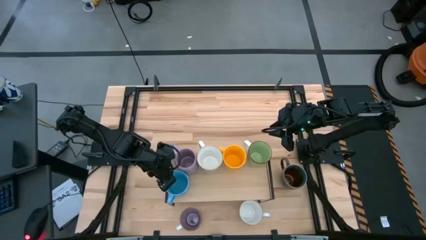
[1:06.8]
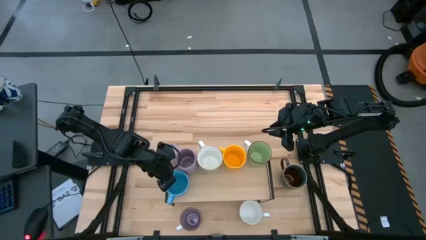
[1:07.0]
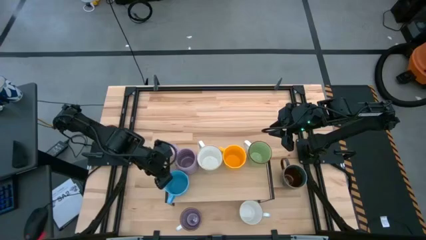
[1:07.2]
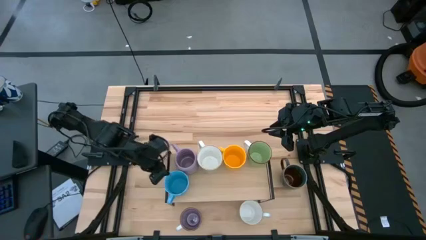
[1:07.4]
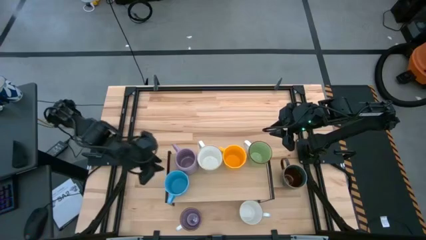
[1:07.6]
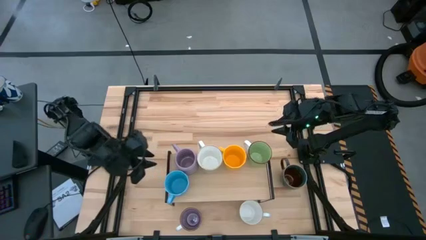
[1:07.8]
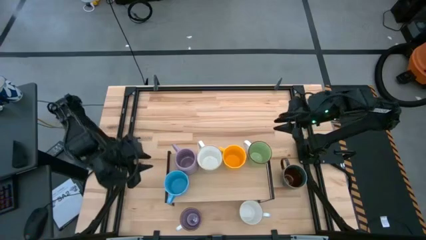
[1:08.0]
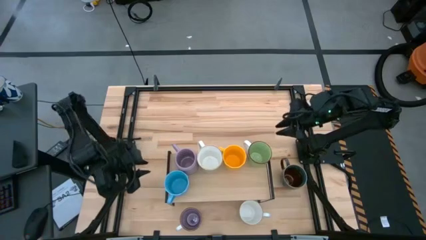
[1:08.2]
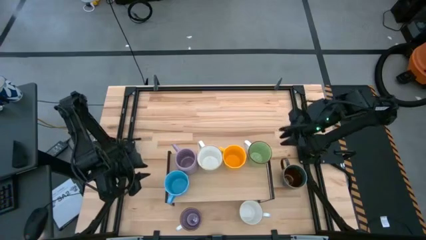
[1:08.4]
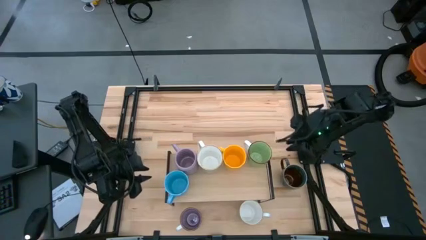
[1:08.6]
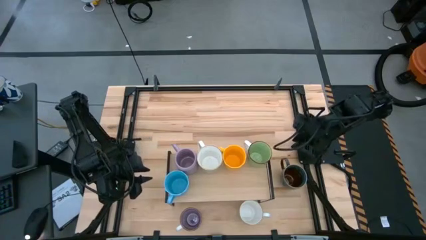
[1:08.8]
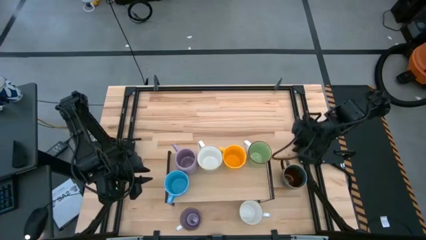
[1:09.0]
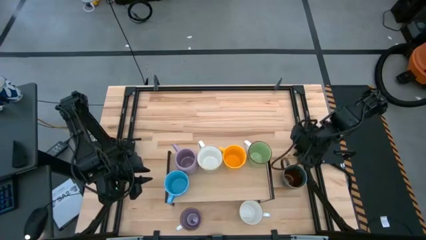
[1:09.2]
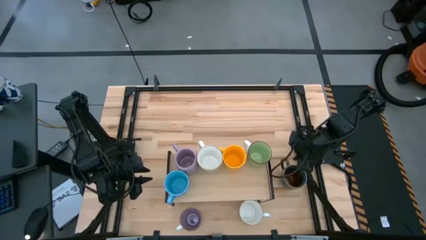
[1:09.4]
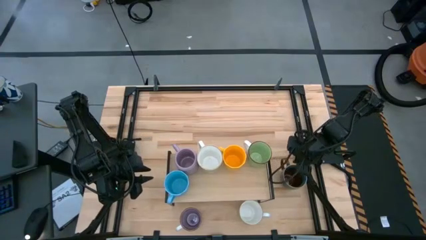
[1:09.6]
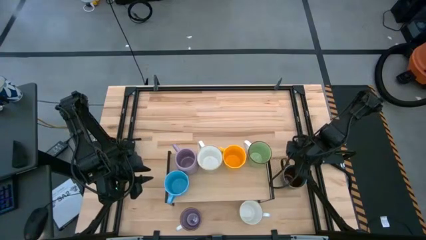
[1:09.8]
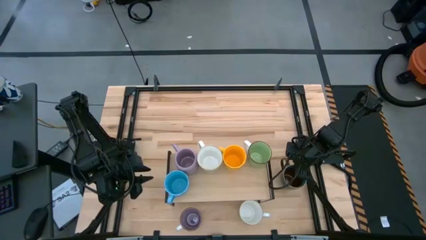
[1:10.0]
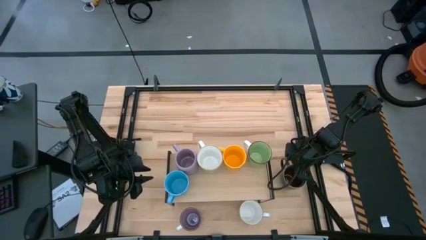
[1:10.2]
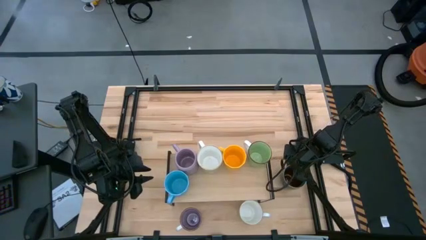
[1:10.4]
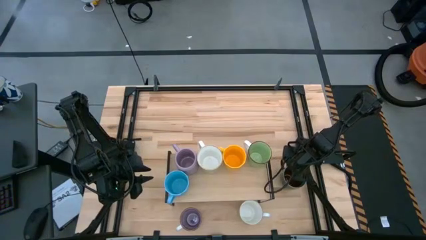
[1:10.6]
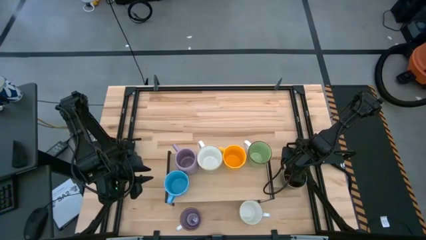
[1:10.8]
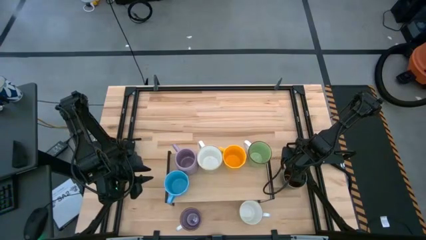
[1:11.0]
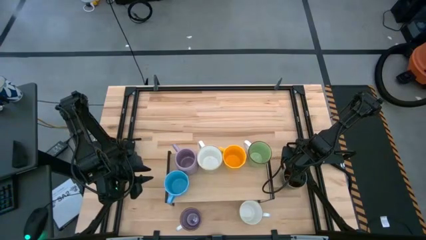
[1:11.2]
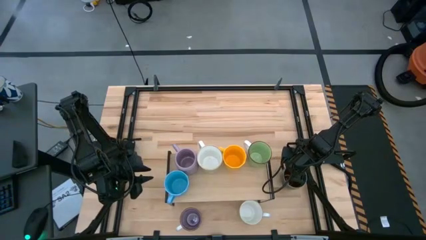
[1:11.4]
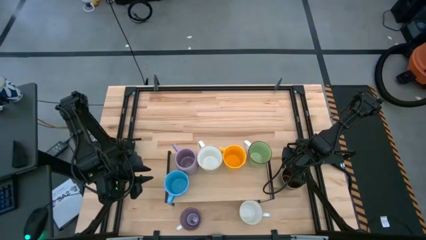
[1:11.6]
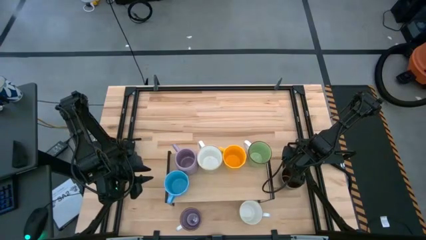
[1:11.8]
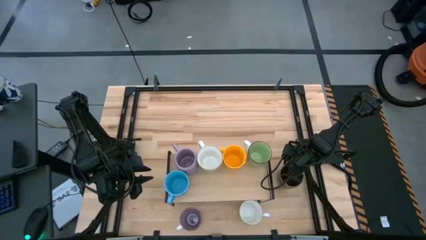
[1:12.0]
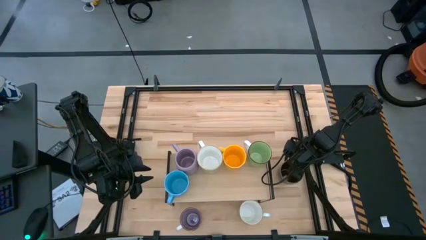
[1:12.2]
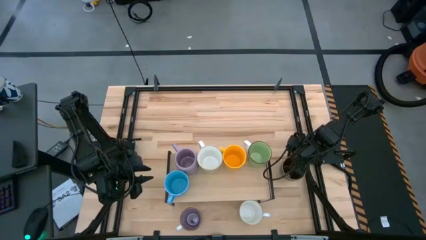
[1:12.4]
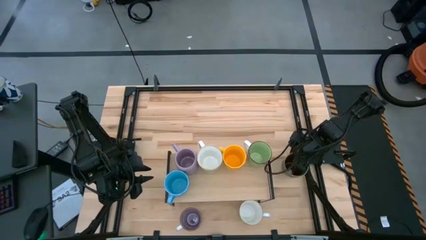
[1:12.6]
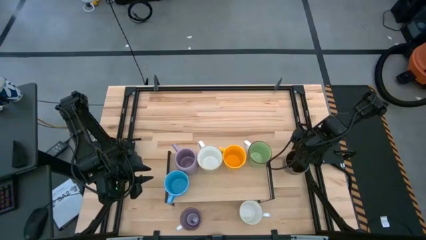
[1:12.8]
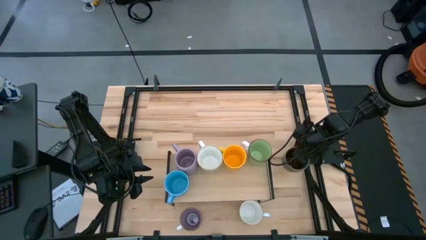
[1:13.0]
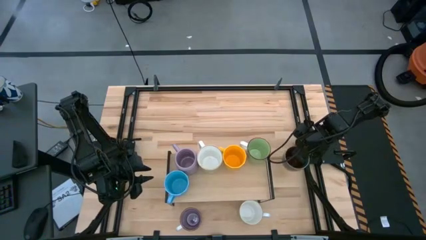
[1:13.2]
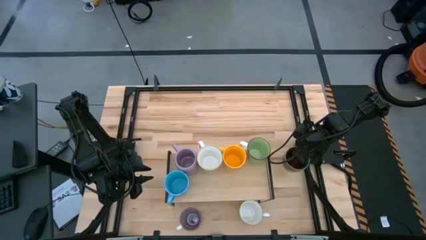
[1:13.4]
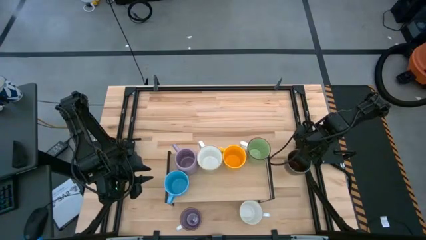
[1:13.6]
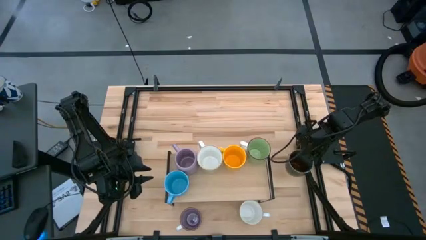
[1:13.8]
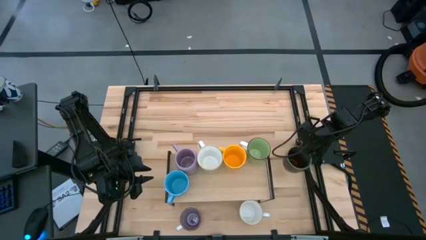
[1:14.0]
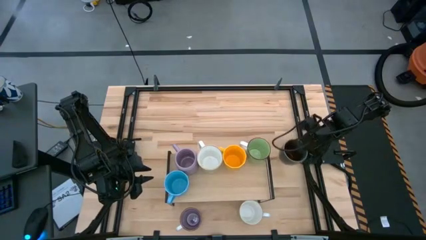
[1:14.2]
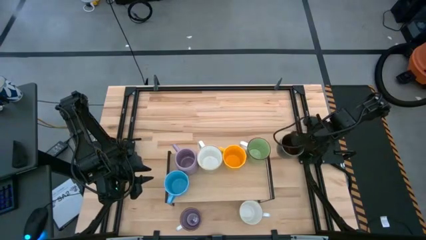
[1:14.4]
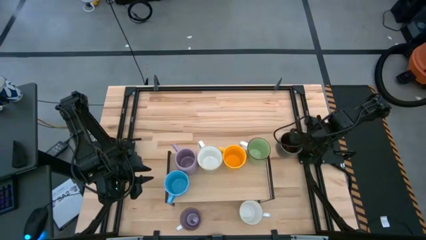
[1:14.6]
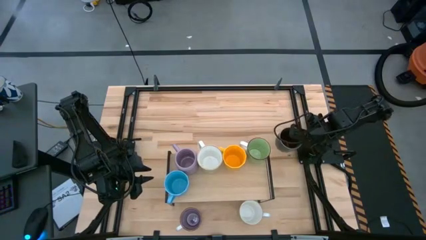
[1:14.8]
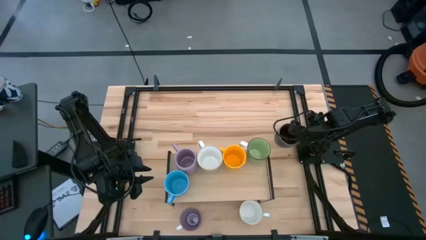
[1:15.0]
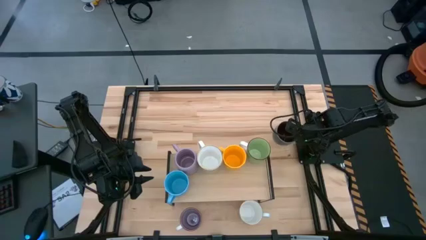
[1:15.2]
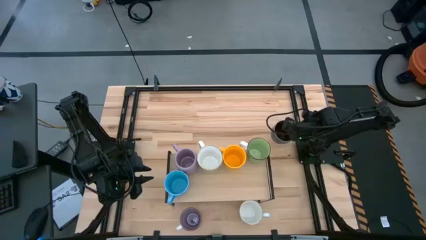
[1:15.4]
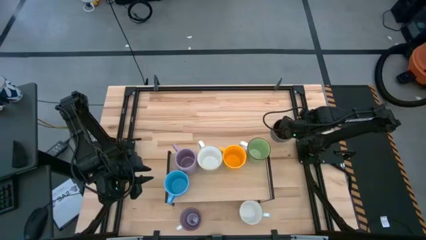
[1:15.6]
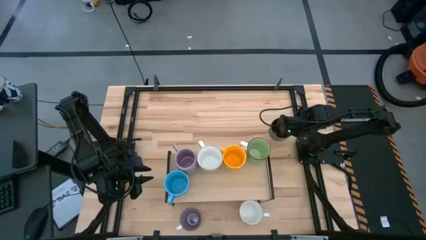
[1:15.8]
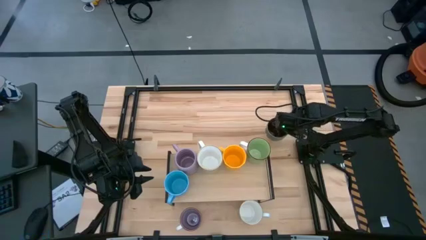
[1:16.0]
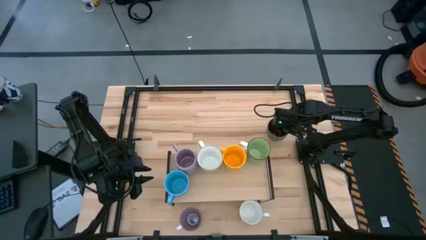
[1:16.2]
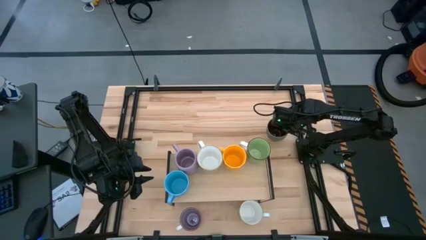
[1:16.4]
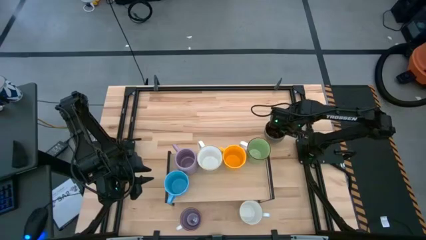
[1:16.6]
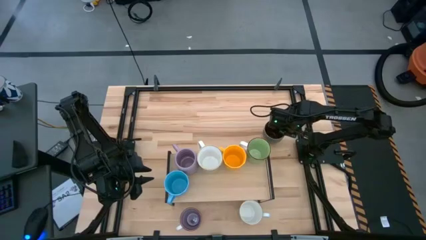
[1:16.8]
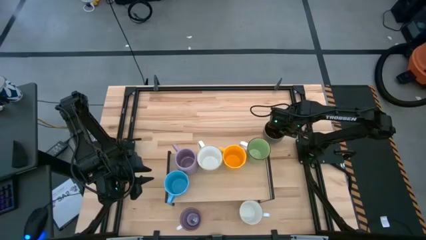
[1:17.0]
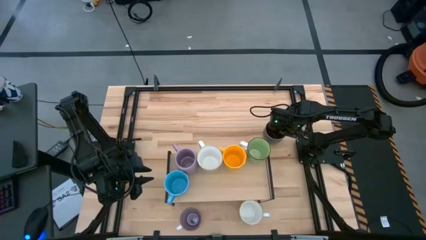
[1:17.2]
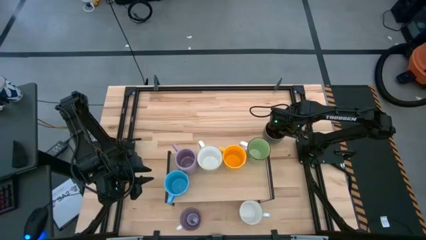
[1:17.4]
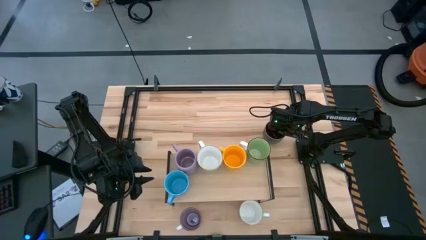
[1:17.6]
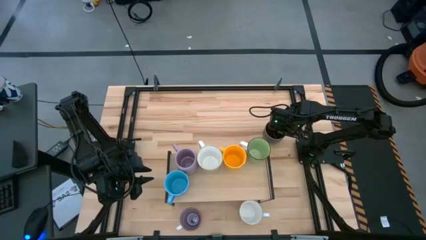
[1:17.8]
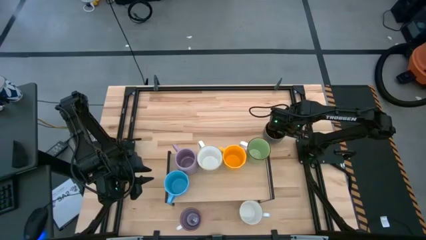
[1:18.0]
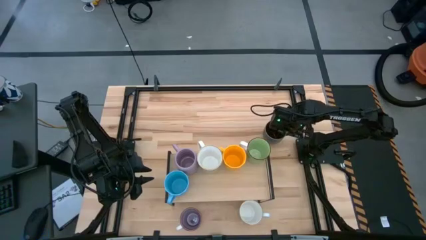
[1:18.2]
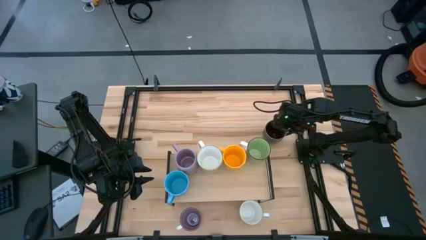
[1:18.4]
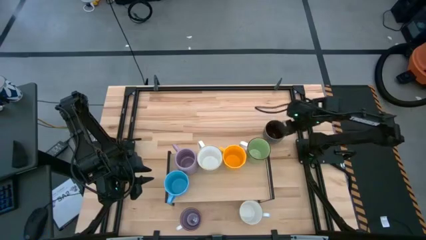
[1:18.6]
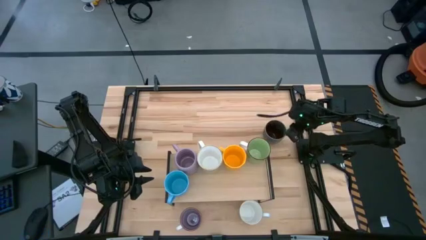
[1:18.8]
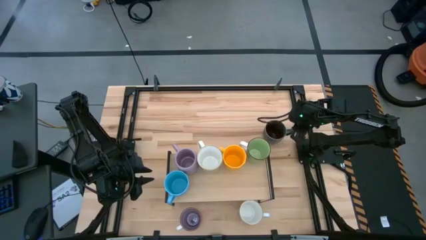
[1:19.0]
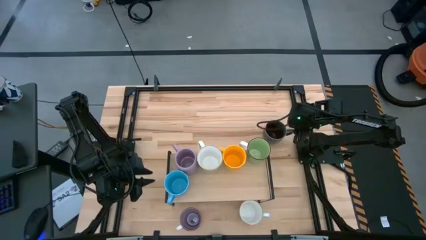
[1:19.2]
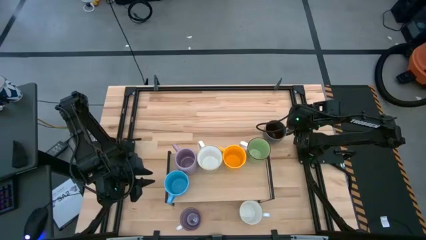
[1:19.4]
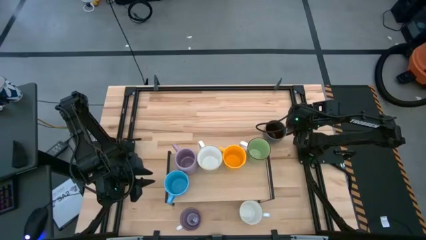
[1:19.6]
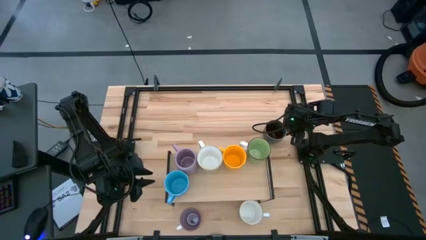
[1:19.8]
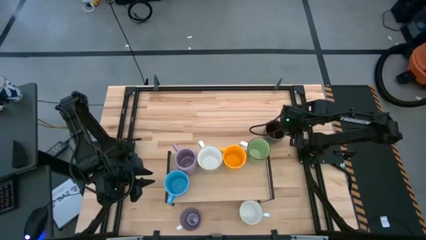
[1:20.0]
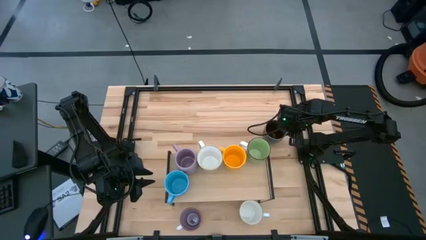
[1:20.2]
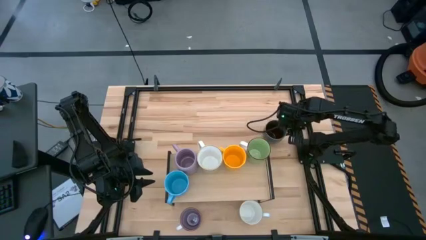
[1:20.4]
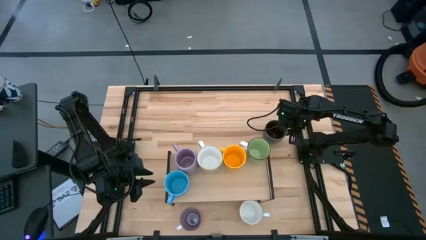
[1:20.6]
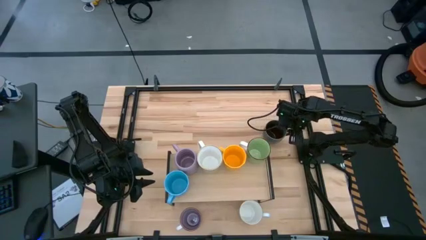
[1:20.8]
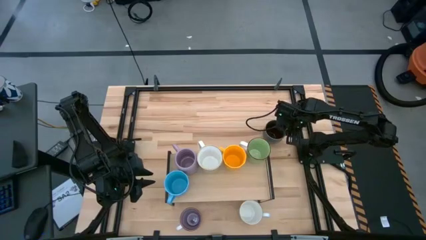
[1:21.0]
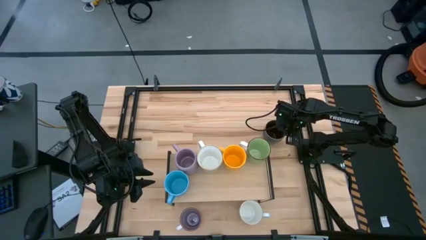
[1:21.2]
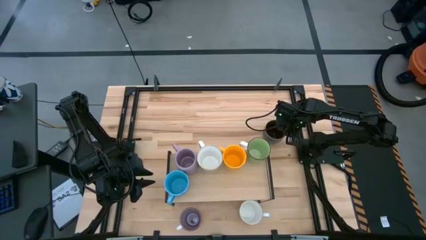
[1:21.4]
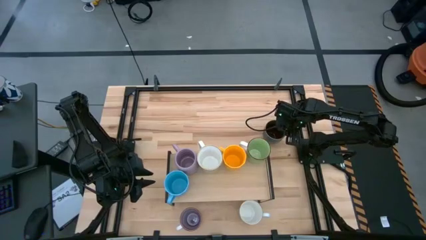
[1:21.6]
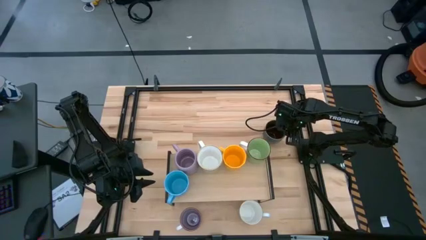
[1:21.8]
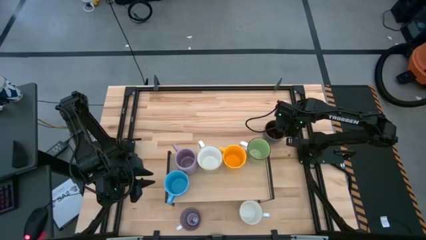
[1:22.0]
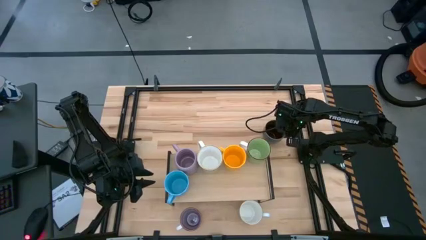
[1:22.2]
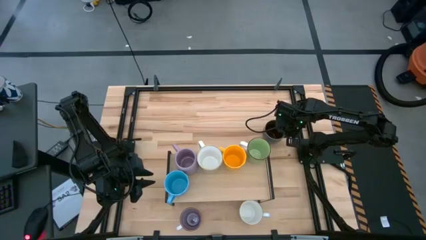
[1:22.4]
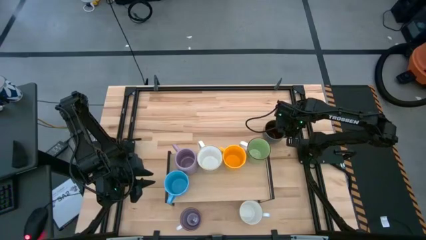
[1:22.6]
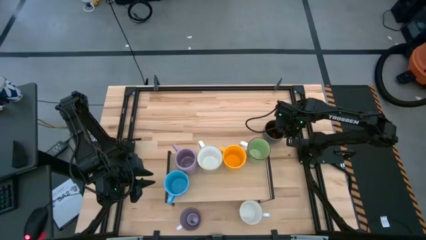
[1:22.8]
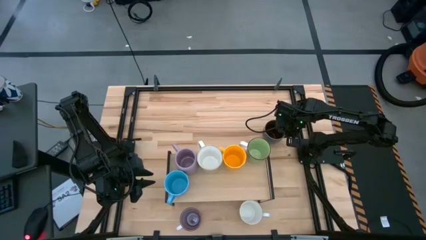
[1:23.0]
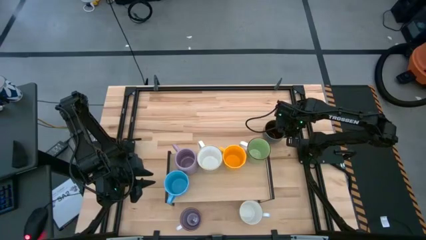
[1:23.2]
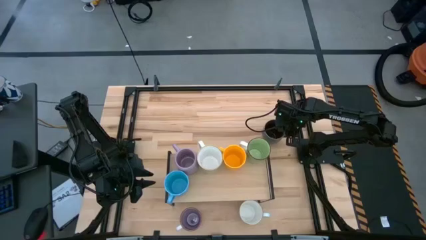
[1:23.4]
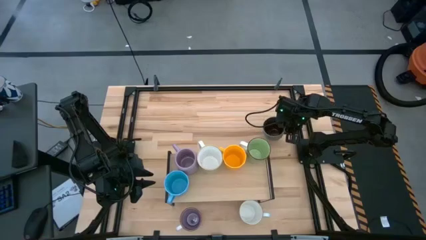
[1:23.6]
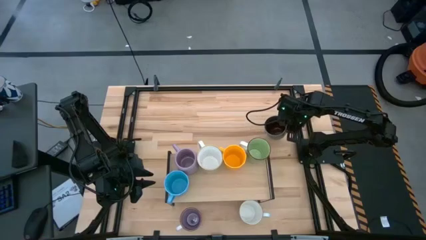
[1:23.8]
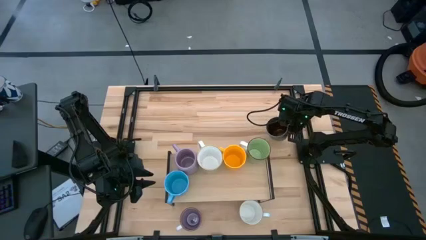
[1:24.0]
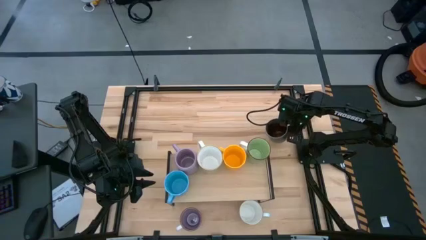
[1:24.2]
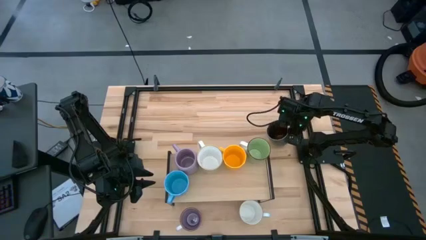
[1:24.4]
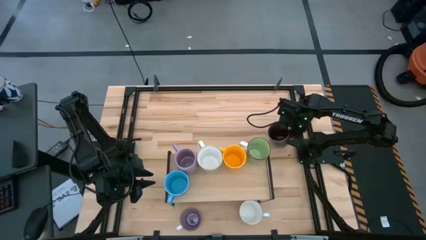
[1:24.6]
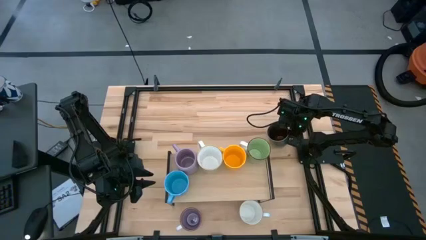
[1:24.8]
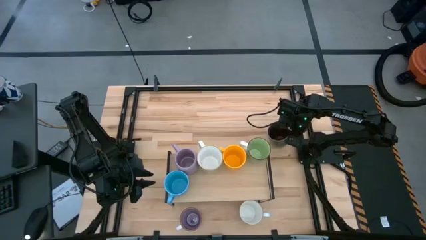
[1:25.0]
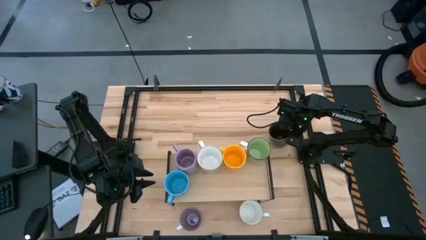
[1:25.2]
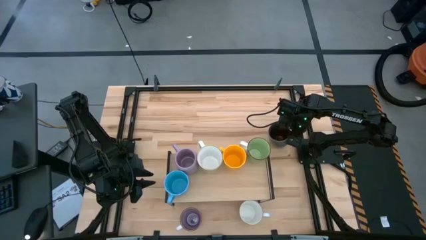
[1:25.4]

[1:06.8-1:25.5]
Task: Place coffee mugs
Put the brown blue mug on the shelf
